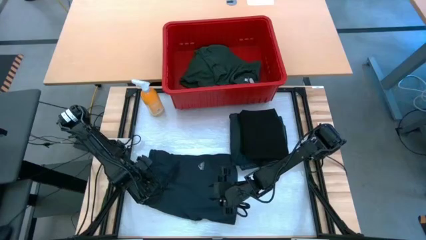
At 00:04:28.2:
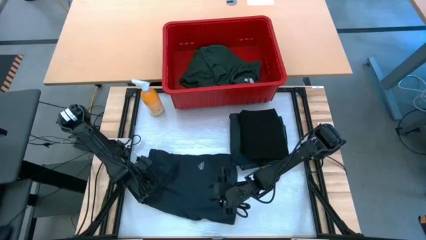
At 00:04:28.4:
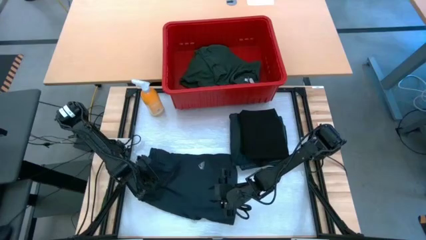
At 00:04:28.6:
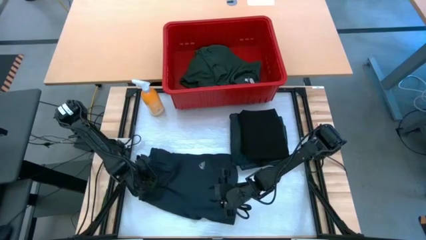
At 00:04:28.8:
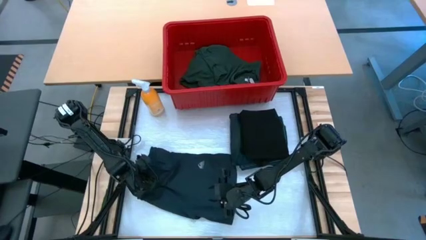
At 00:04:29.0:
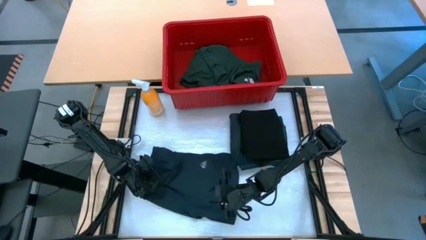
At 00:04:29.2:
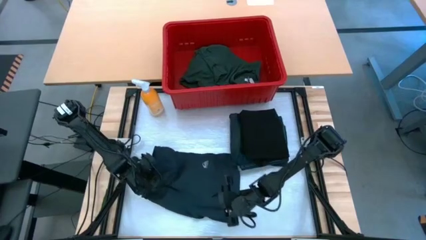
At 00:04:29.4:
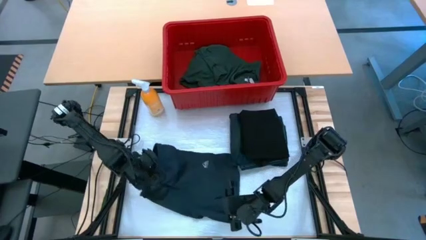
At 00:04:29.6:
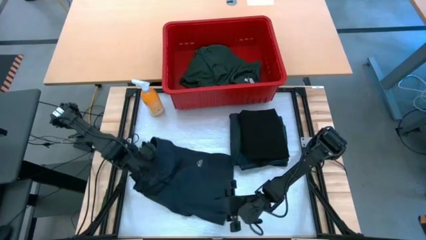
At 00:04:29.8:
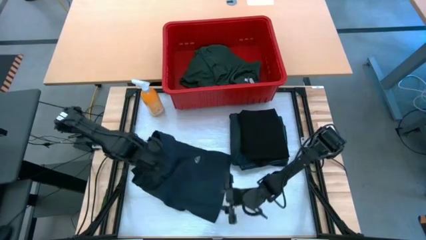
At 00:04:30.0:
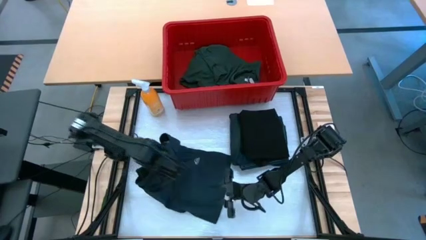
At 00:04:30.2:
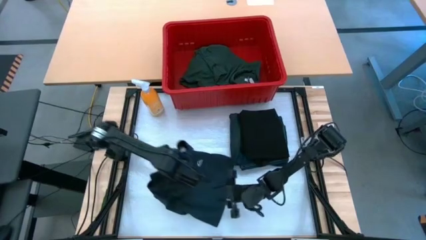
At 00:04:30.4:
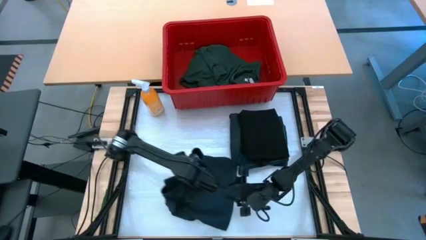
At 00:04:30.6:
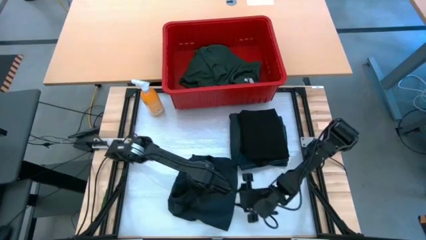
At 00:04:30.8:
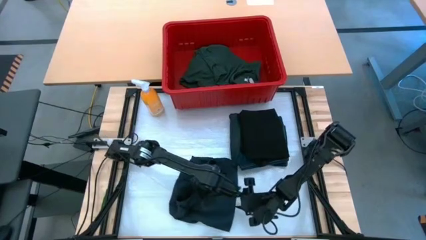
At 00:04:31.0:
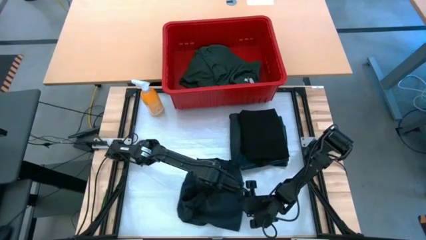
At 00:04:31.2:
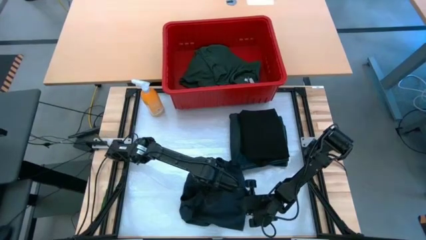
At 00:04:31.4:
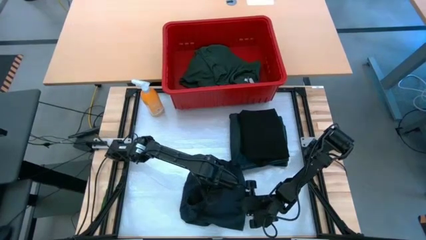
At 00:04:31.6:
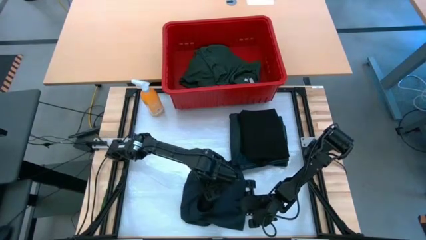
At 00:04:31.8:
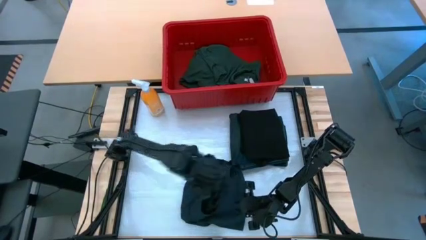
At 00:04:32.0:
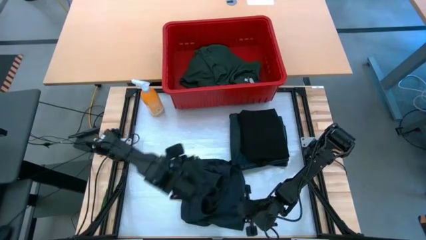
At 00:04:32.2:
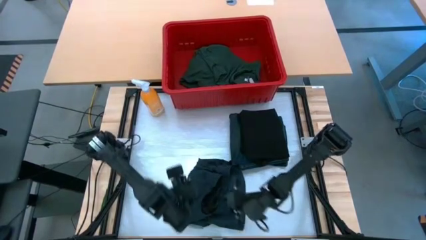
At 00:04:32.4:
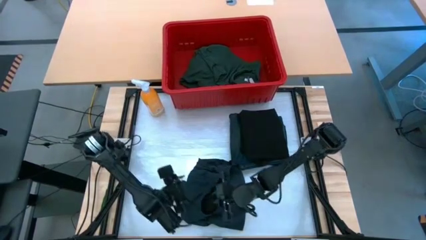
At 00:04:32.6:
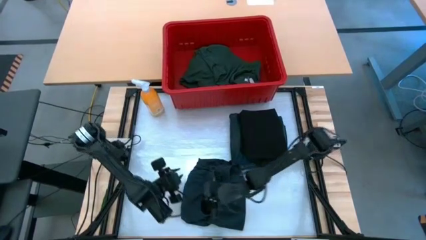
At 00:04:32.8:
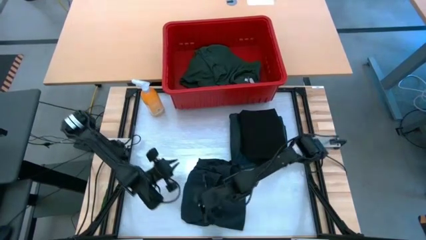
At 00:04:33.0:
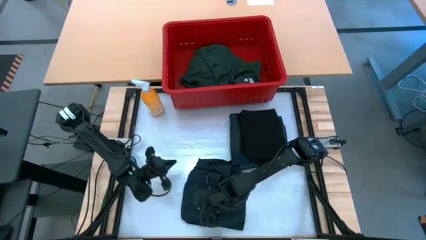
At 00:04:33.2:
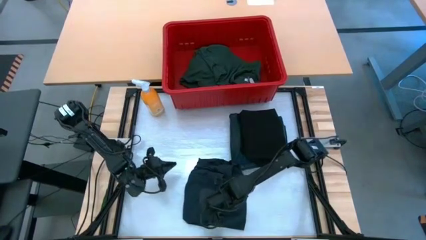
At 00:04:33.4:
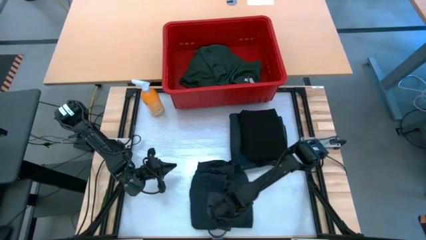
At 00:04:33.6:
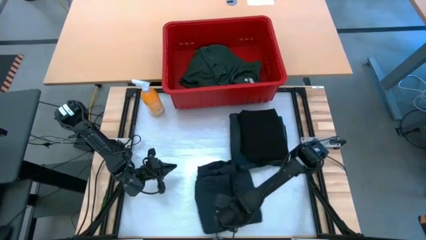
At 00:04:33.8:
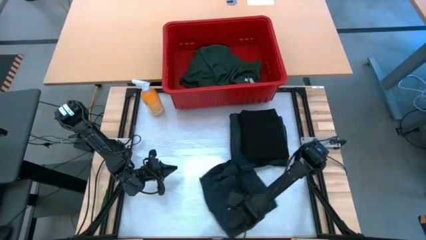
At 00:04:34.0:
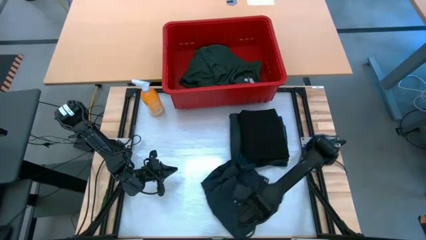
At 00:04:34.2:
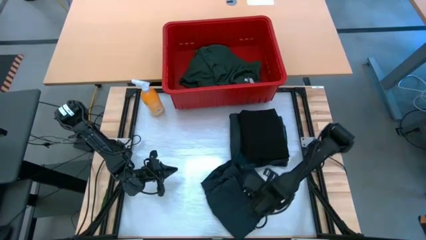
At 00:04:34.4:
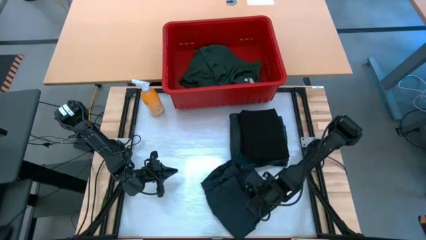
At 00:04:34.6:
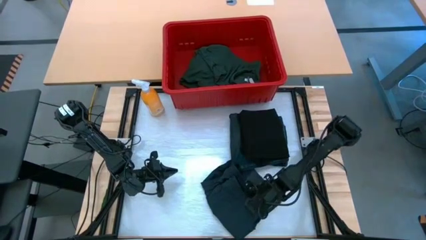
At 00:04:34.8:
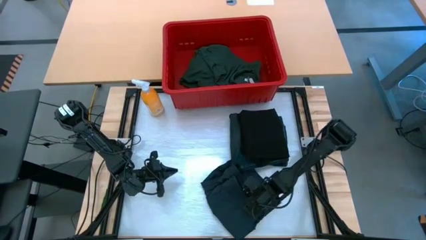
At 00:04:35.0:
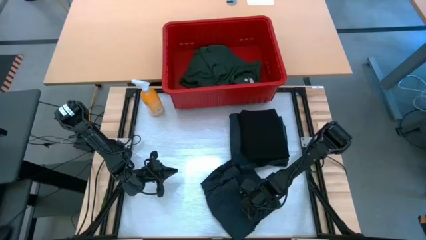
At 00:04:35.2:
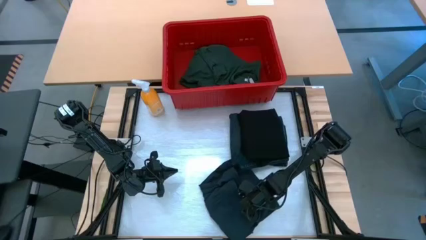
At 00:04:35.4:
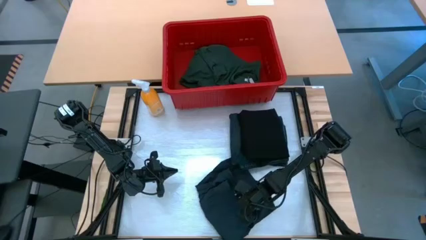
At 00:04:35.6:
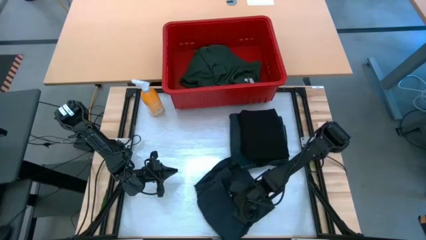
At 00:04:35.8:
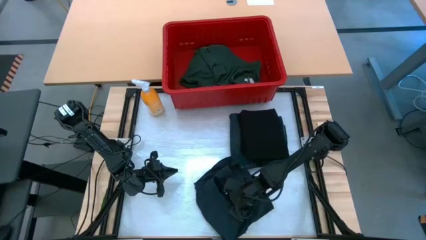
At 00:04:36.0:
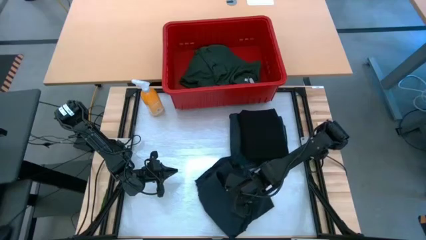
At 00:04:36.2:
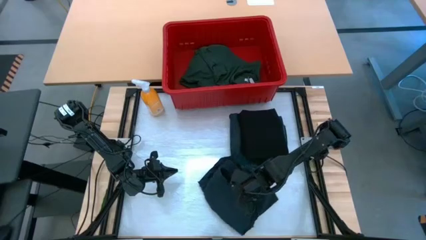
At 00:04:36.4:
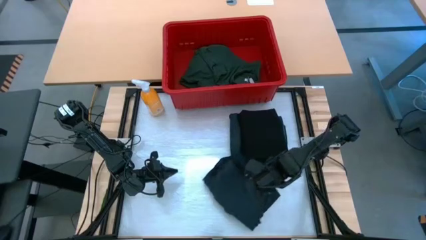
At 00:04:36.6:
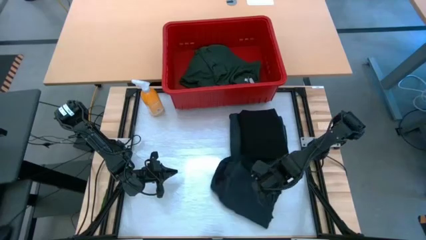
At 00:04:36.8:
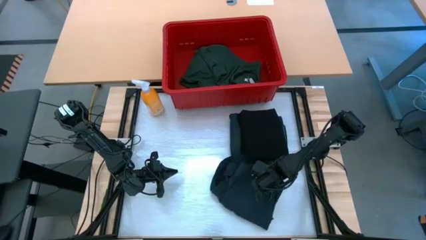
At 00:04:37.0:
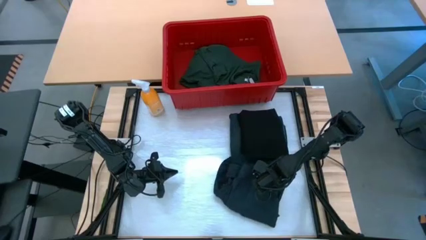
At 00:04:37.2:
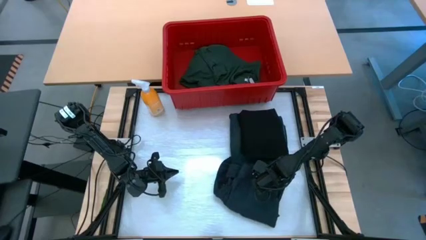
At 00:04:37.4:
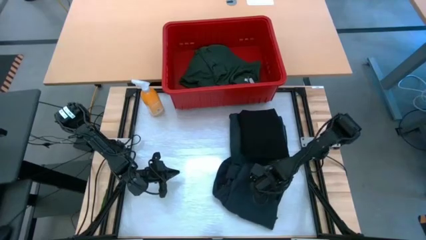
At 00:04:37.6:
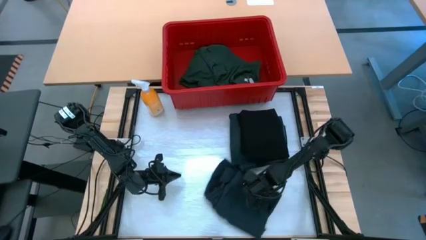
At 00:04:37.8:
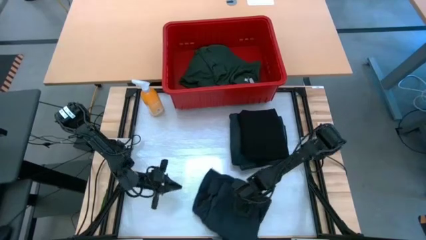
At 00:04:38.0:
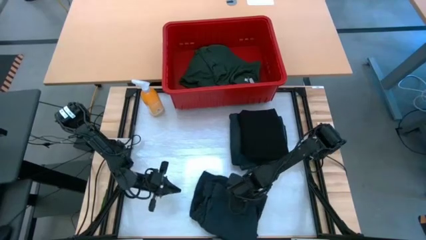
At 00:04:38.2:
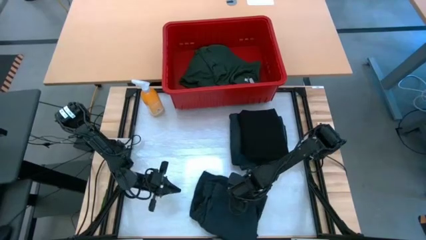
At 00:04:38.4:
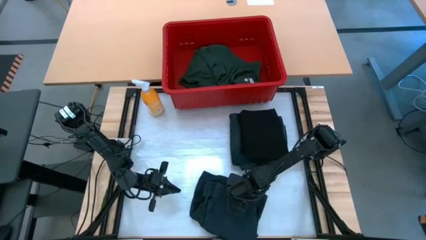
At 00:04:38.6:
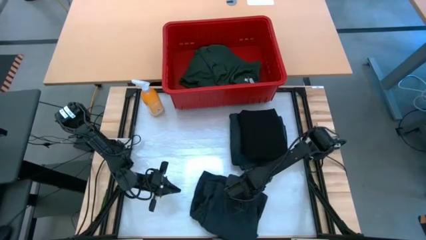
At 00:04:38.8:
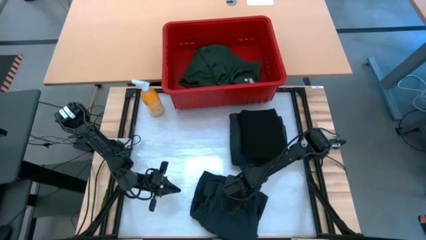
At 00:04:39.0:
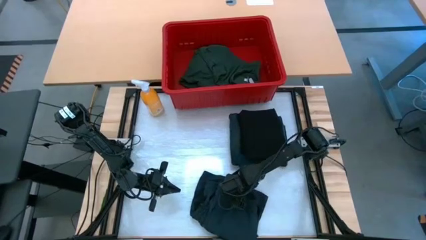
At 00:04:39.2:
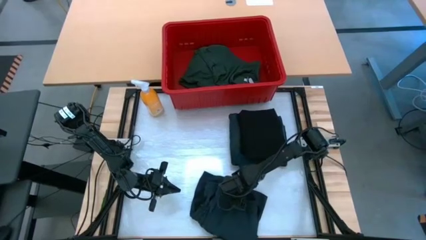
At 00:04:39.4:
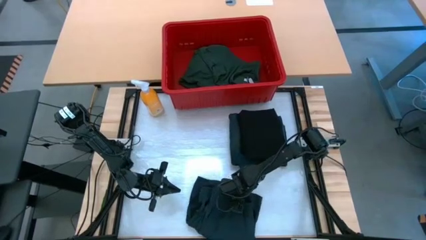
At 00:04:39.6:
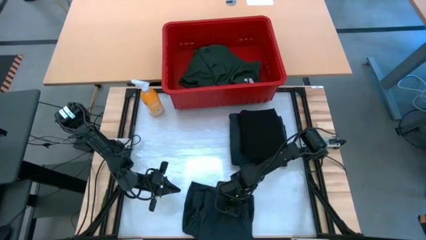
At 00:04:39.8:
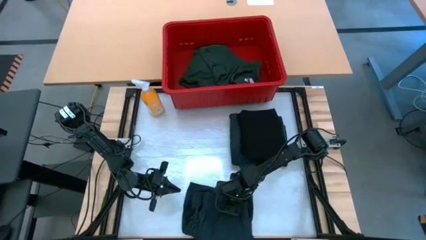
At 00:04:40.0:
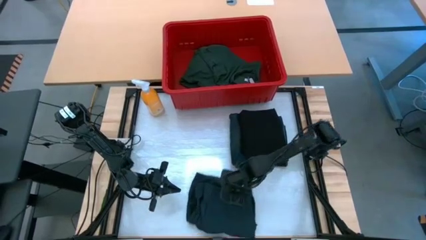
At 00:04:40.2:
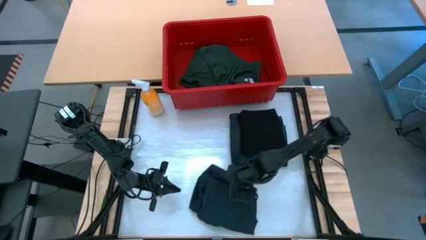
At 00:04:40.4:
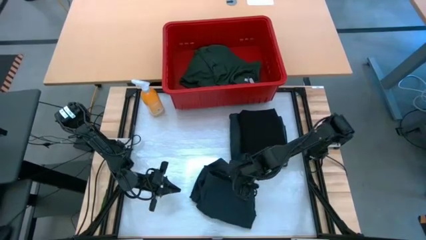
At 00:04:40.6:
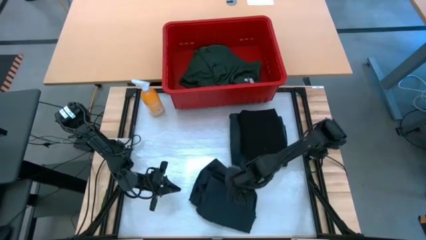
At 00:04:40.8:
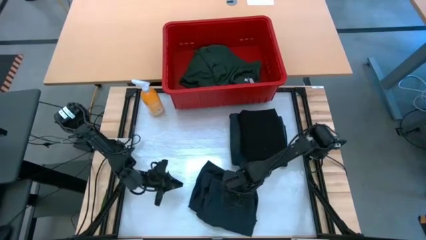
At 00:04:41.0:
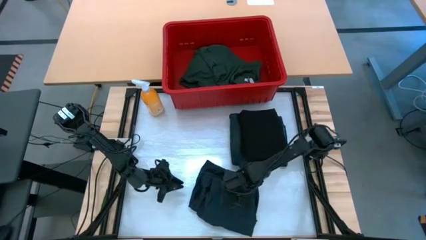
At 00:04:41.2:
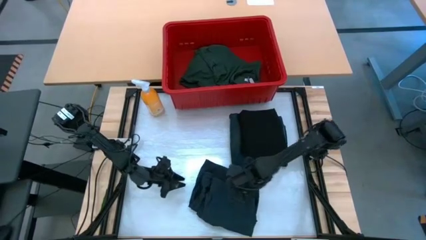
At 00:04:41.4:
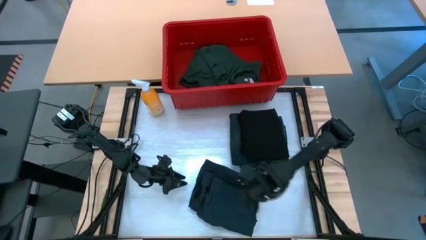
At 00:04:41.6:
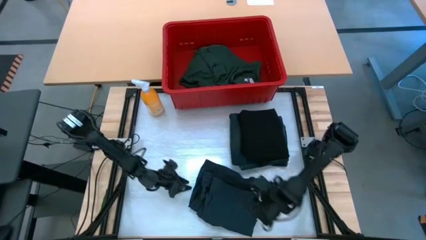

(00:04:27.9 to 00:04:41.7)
Task: Fold Laundry from Bin
Fold the black shorts
